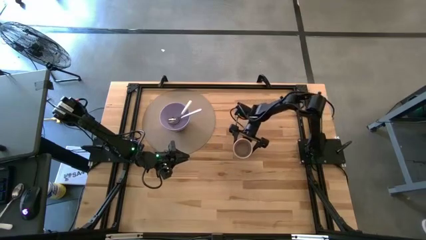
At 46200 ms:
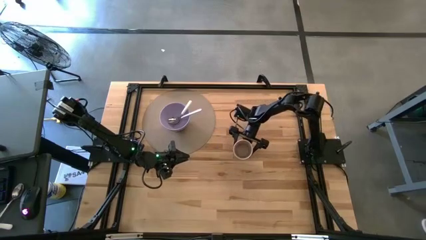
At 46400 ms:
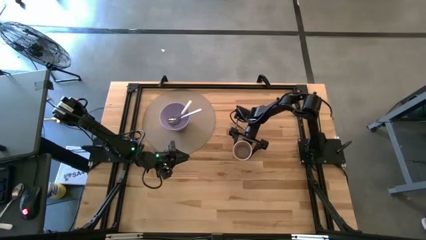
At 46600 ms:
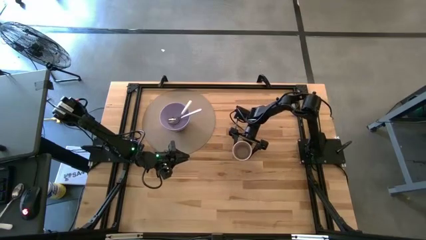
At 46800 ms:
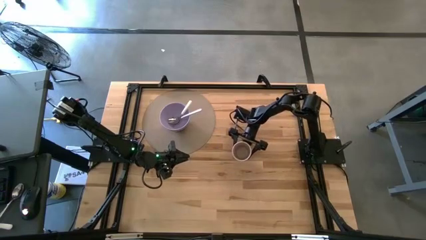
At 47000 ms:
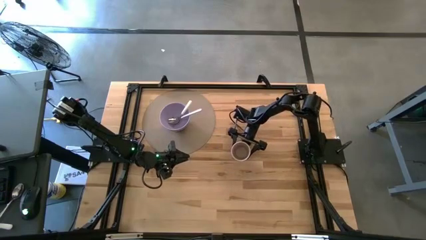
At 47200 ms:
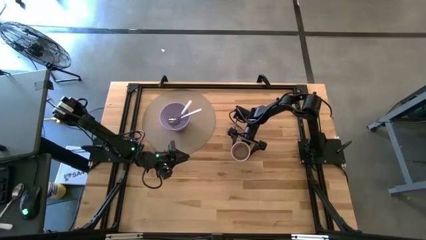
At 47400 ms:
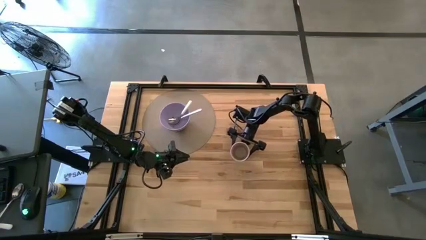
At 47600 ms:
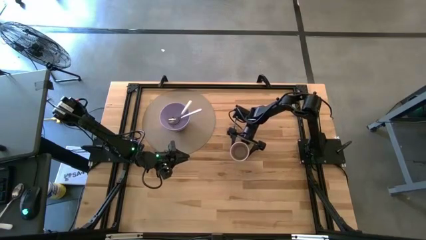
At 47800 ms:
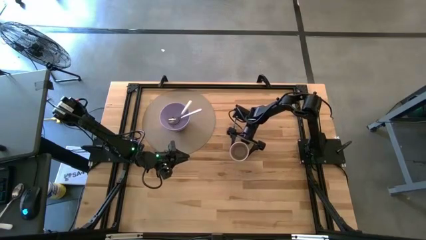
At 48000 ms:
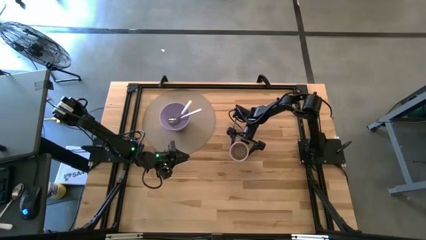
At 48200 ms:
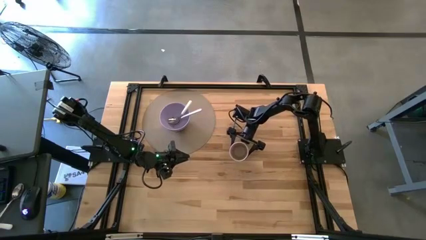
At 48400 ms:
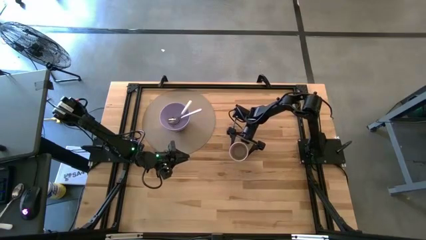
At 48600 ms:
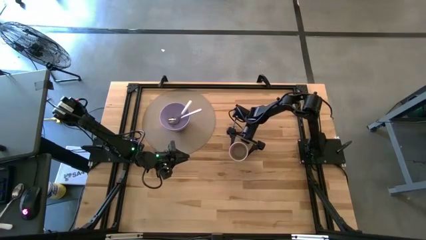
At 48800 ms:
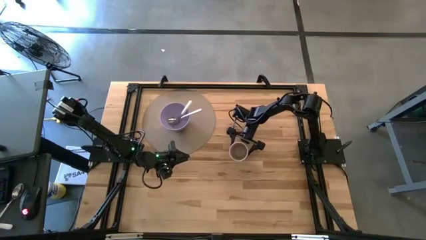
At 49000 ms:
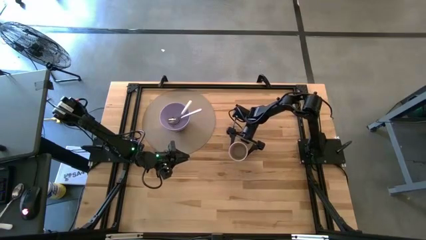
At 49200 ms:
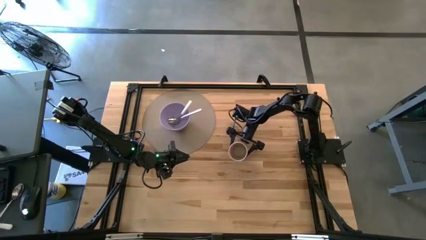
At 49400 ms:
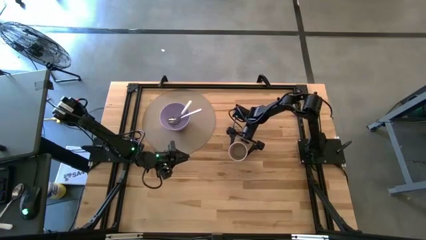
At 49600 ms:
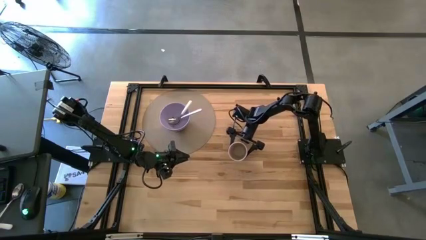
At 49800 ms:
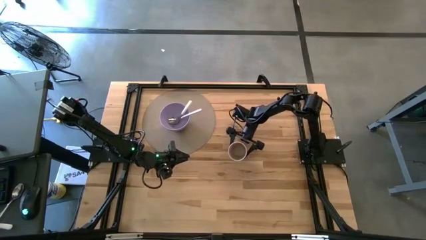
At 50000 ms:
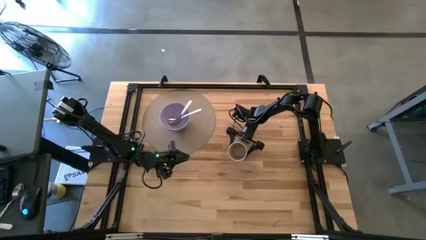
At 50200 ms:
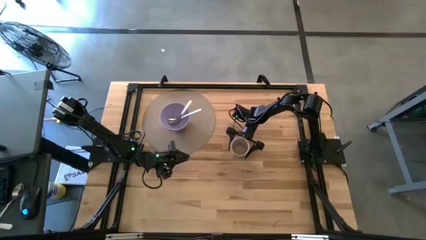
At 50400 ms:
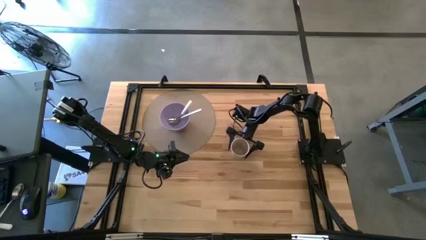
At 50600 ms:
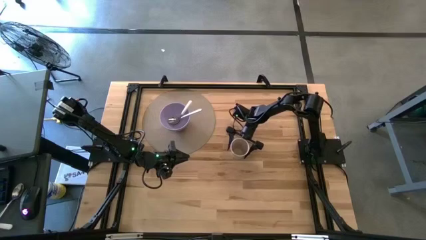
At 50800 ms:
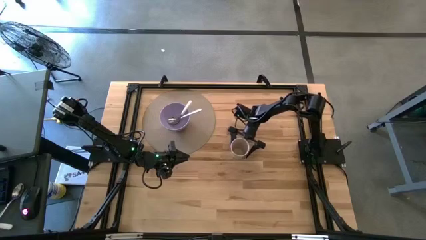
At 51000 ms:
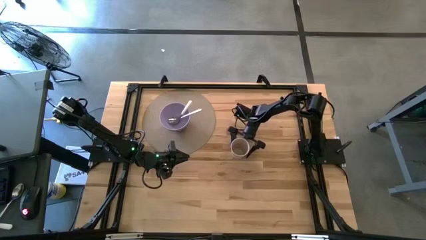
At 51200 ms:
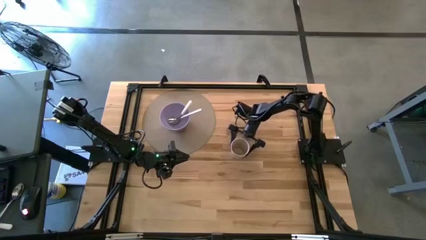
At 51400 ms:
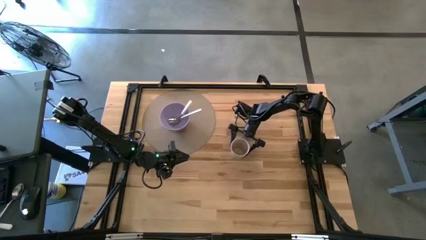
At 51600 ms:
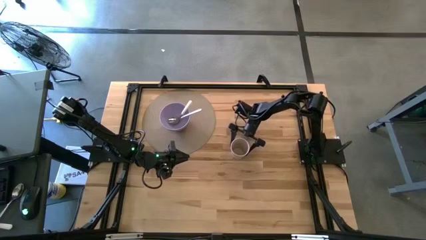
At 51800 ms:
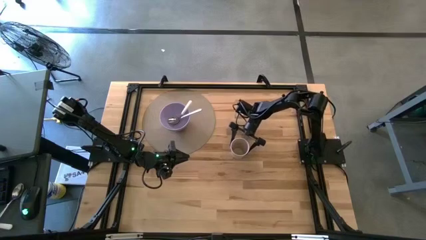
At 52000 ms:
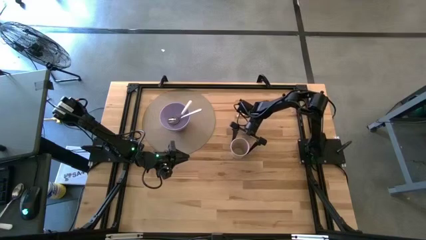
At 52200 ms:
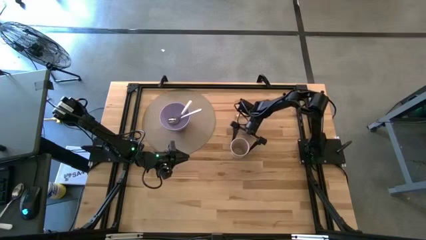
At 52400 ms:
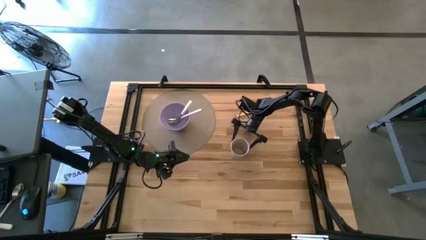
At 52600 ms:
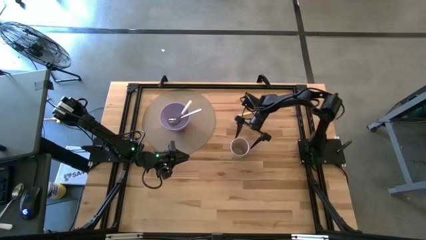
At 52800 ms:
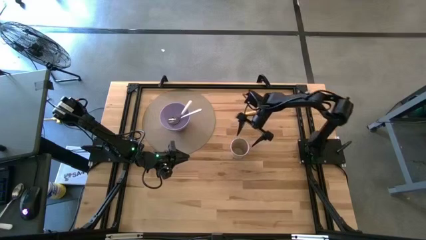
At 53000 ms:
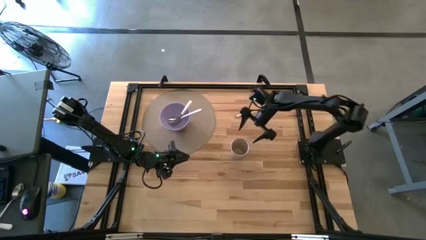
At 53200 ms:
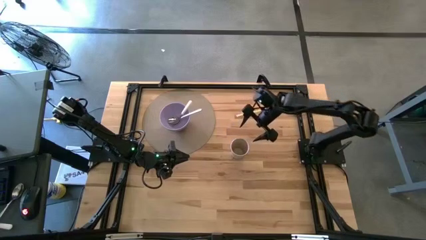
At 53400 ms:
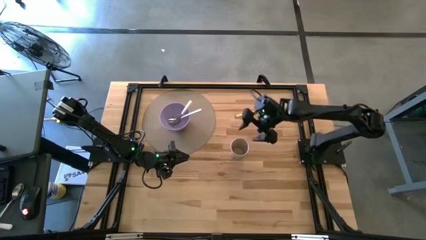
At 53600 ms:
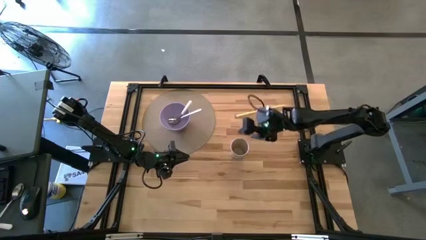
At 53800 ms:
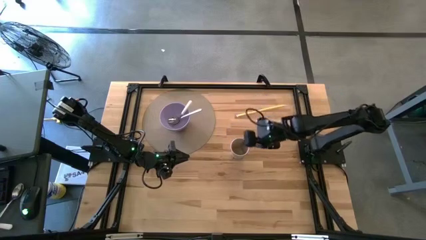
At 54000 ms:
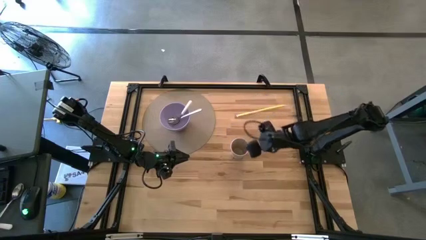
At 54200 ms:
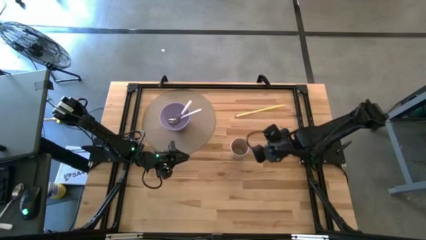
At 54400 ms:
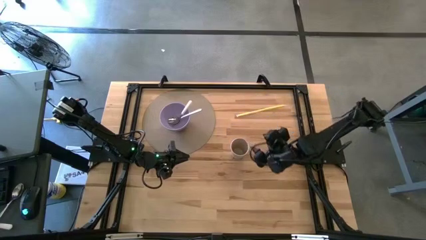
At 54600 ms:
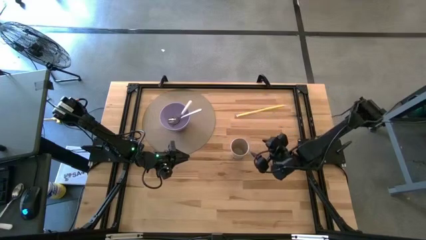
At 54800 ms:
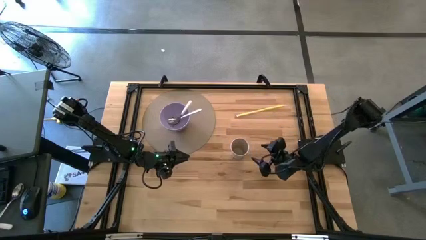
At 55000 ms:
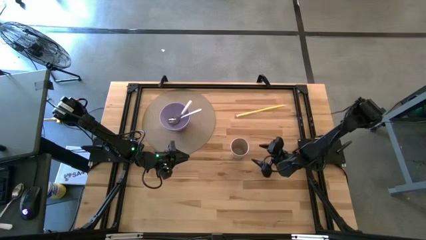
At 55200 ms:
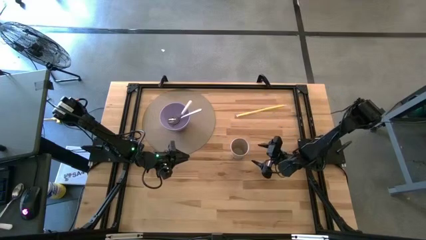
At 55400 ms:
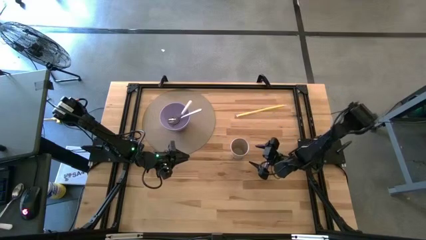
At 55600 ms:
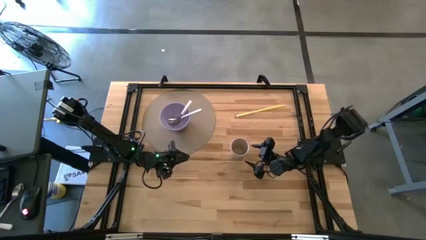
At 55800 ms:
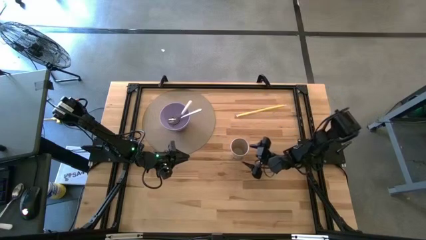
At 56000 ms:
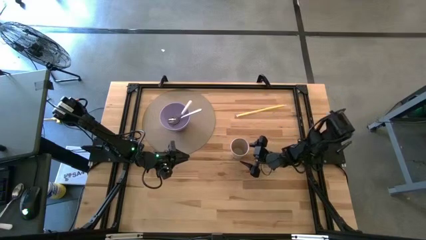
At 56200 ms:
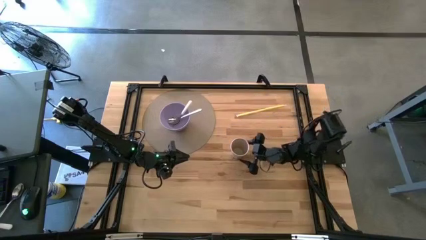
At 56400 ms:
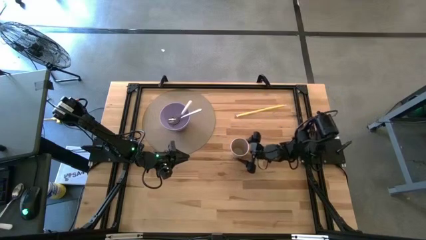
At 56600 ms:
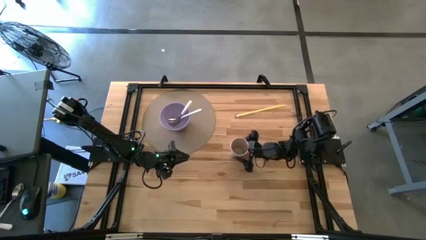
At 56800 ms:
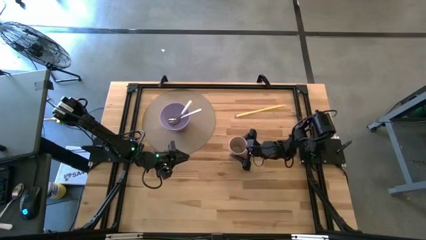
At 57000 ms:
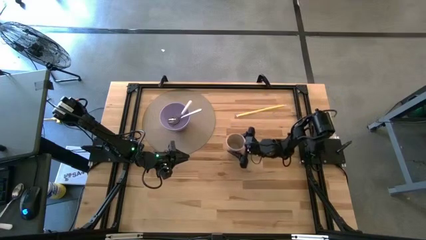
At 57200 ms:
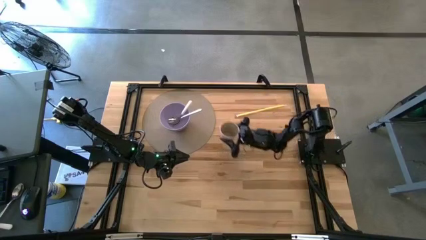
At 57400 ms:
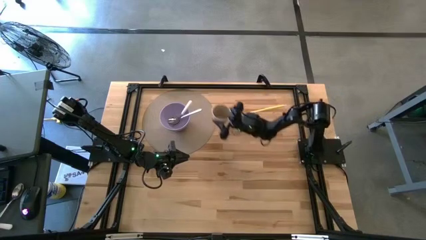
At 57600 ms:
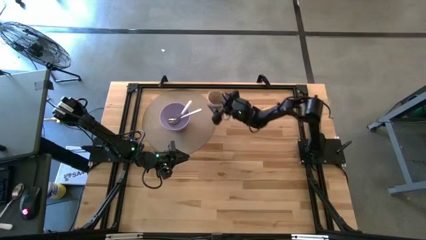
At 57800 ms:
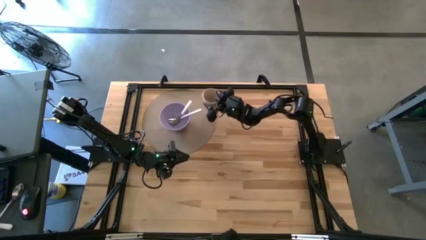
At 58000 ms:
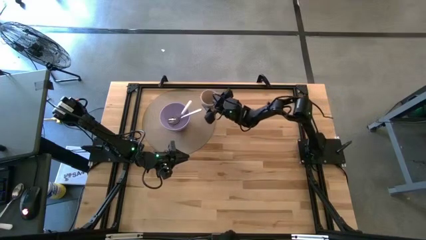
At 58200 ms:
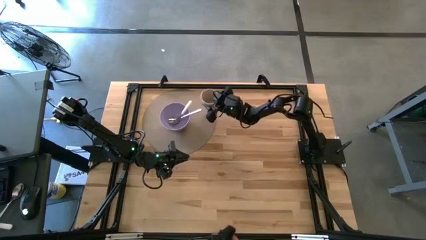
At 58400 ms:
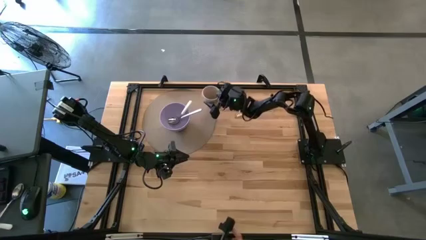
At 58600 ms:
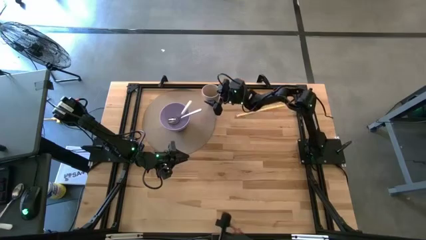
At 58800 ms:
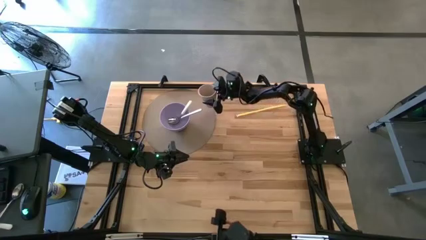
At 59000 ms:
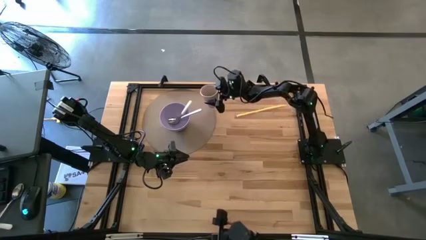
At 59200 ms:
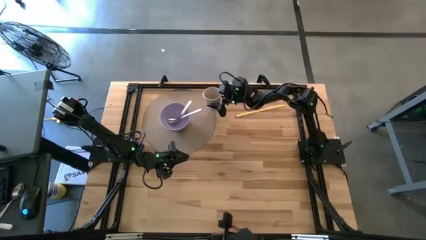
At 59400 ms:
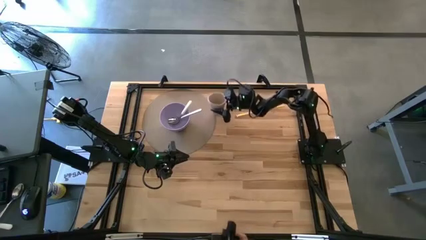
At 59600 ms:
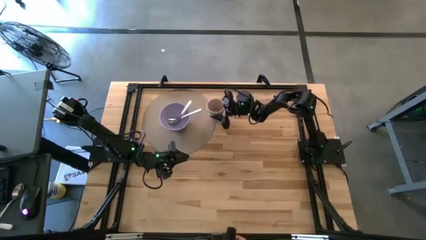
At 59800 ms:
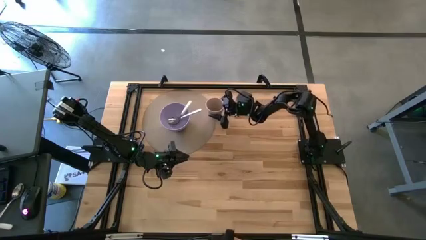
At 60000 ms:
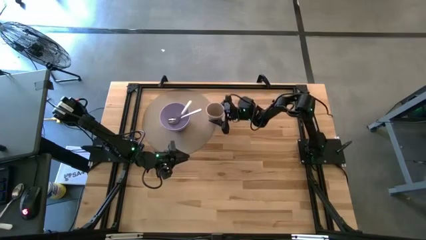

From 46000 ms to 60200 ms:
Task: Pick & Place Utensil
Put the white cup on the brown mat to the top right of the violet bowl
